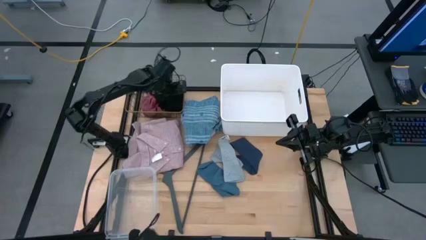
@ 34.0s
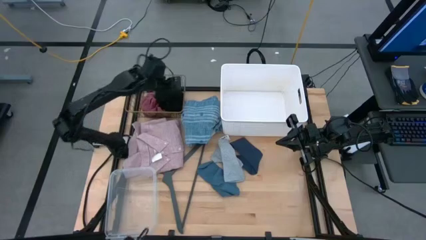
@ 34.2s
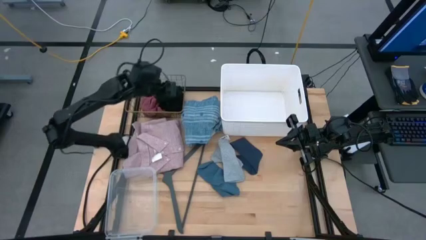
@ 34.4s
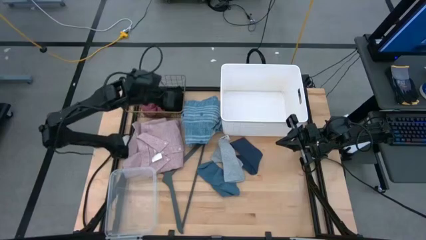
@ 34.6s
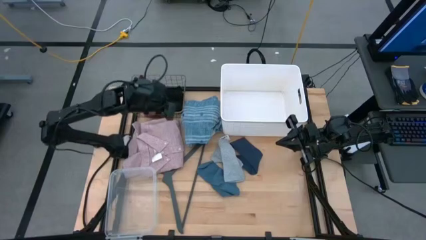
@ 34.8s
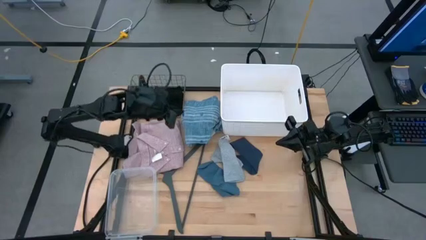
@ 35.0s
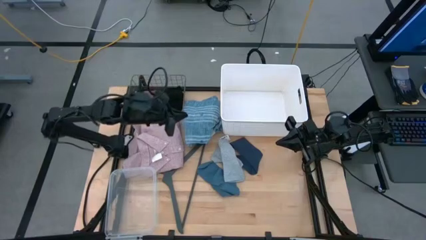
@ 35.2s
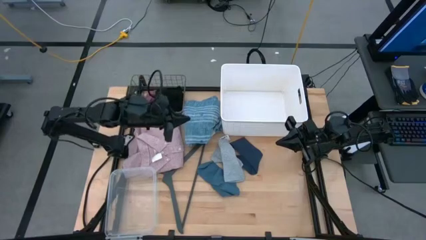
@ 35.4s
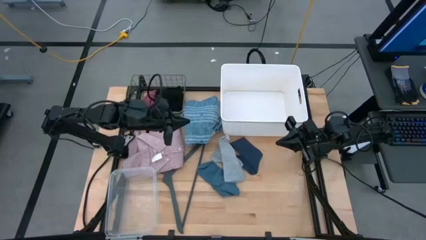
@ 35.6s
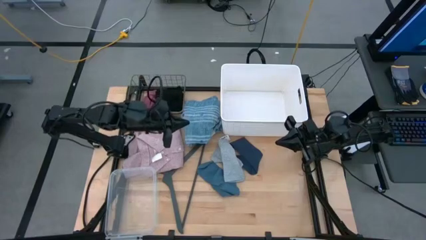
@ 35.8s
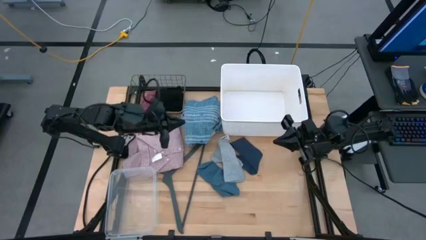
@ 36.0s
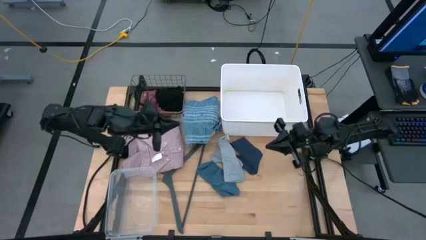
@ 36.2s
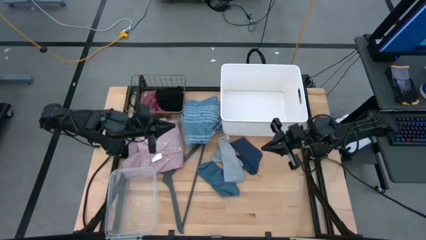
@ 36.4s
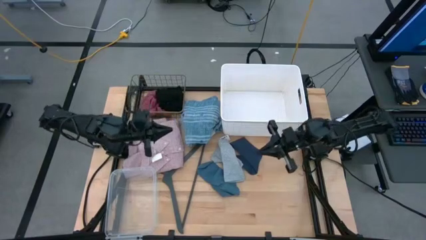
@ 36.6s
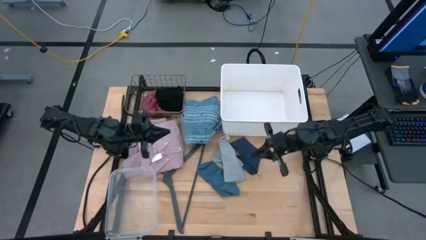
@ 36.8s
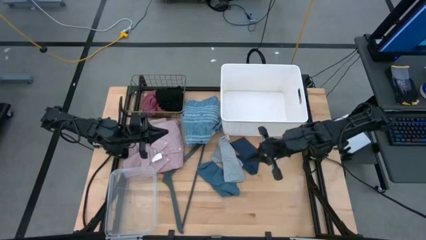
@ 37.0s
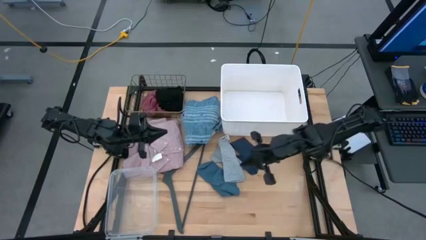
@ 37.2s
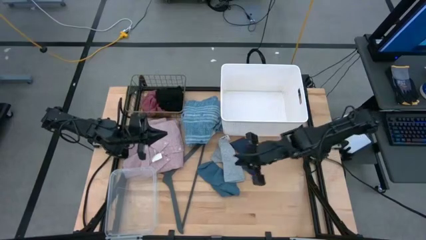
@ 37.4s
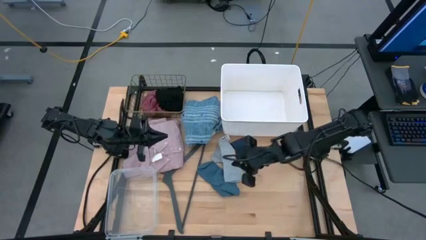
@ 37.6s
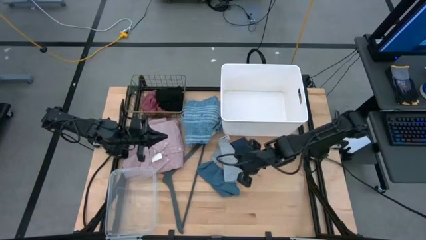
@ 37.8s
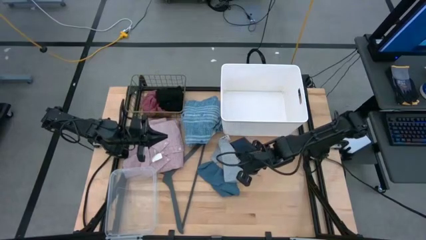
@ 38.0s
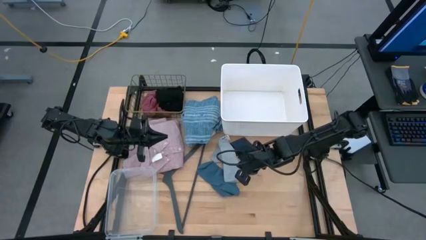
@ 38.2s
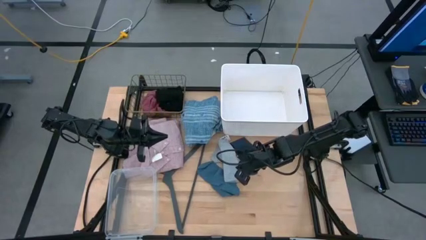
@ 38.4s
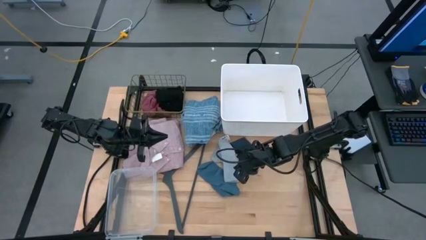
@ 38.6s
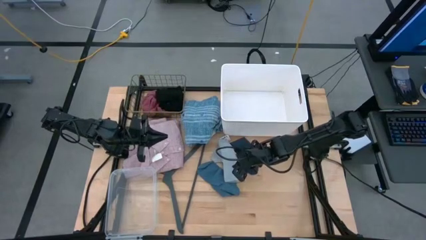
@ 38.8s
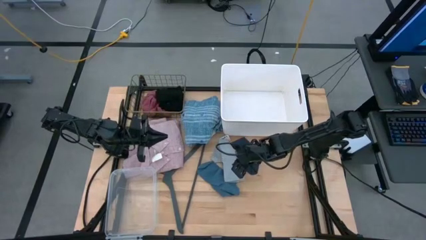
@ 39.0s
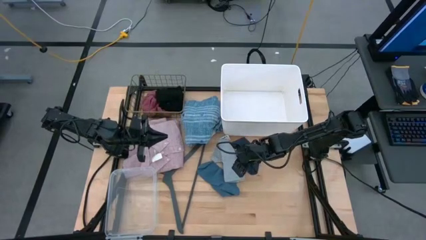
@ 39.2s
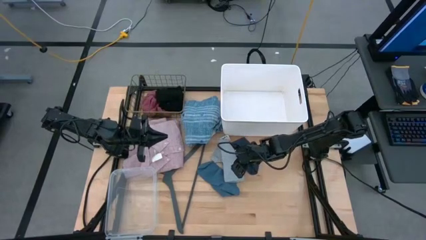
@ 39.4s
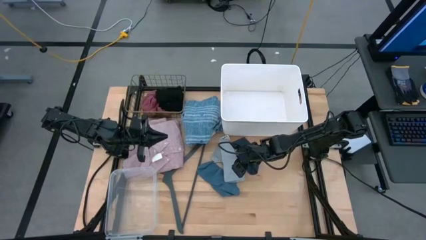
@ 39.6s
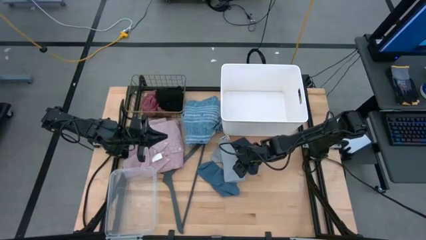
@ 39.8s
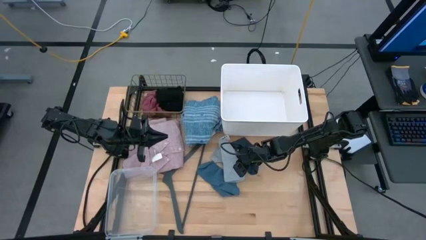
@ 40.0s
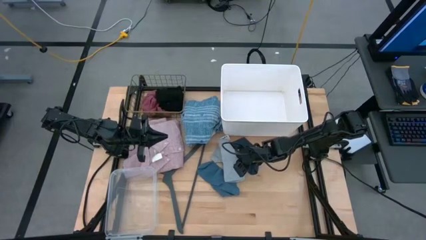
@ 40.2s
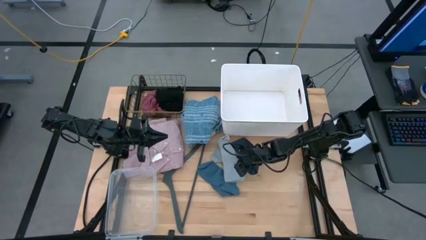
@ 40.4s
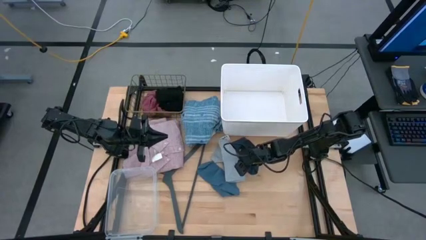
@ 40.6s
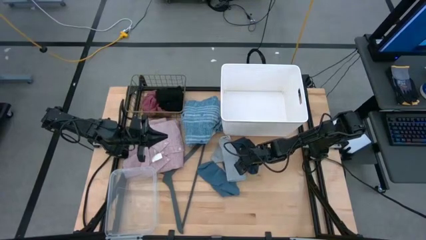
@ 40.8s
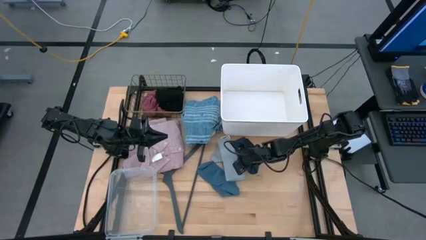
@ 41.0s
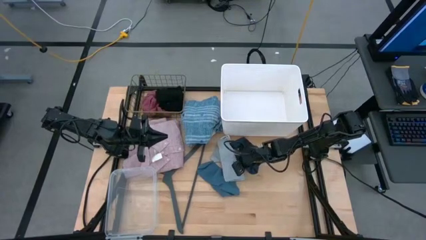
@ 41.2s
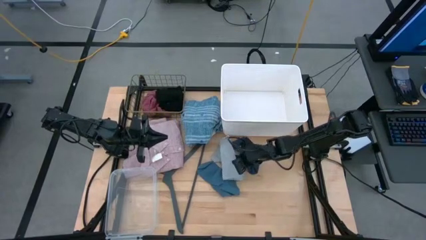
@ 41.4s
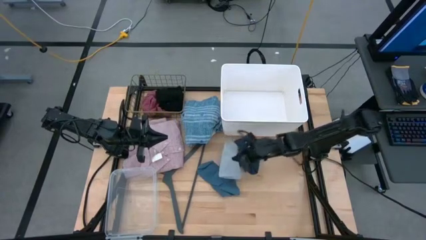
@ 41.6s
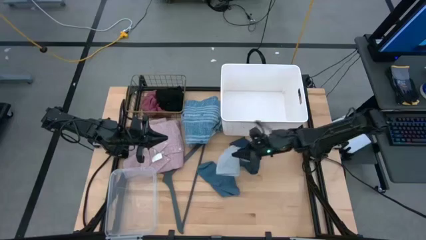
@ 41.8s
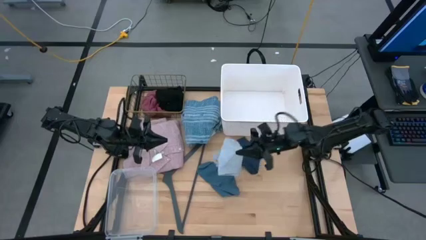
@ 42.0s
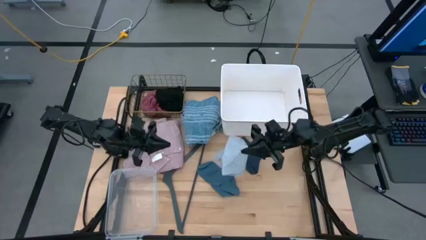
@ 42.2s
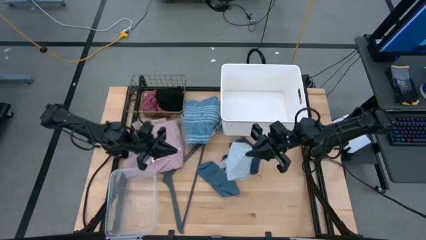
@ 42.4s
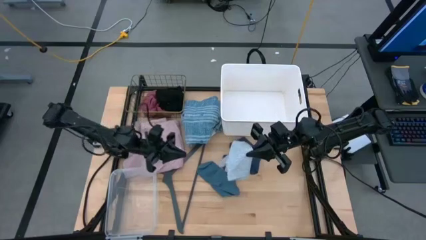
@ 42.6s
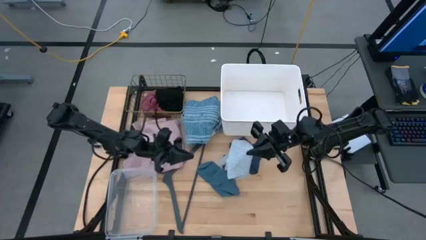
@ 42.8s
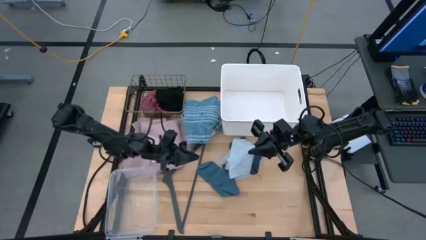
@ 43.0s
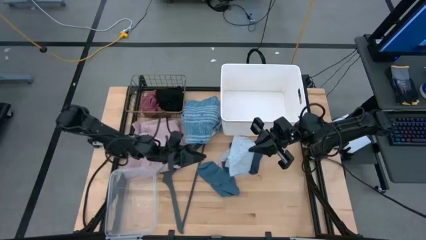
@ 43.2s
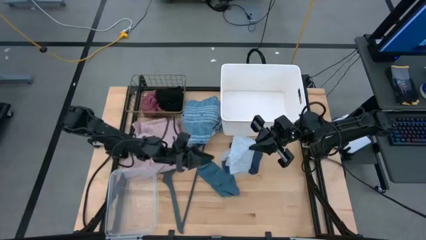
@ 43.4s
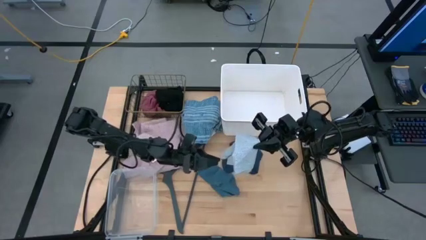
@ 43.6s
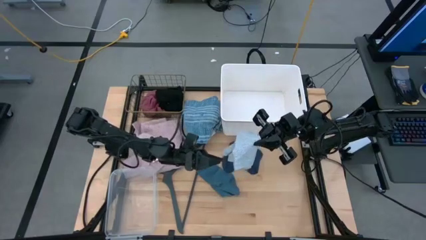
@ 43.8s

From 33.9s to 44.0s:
Task: Pick & Place Cloths
Put the gray undergarment into the gold wire basket
